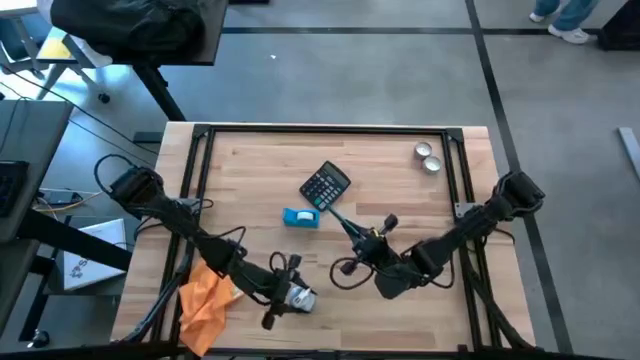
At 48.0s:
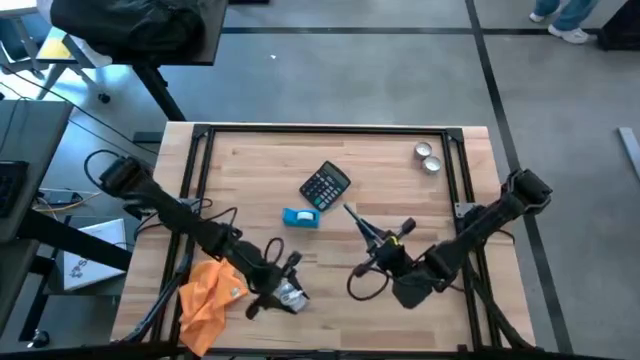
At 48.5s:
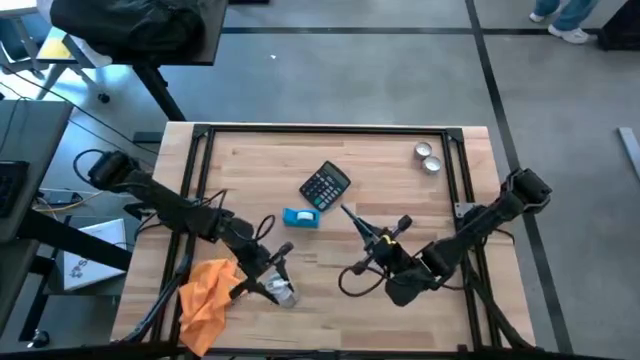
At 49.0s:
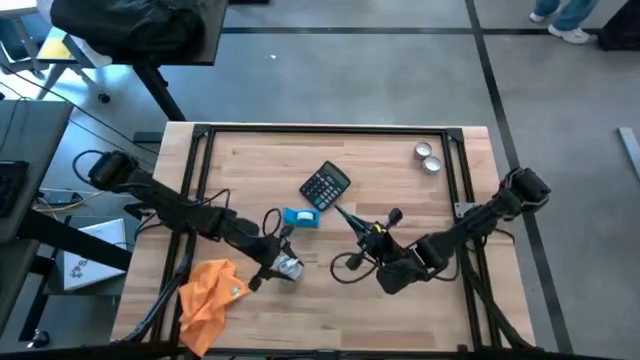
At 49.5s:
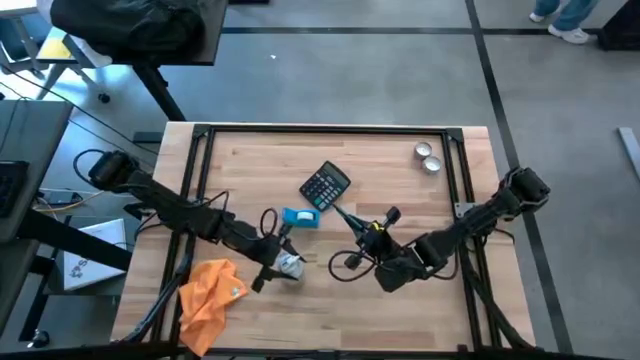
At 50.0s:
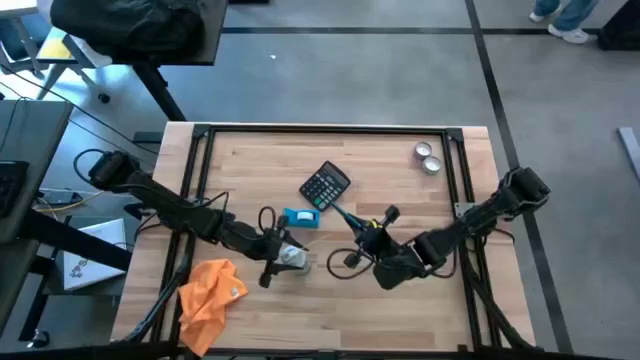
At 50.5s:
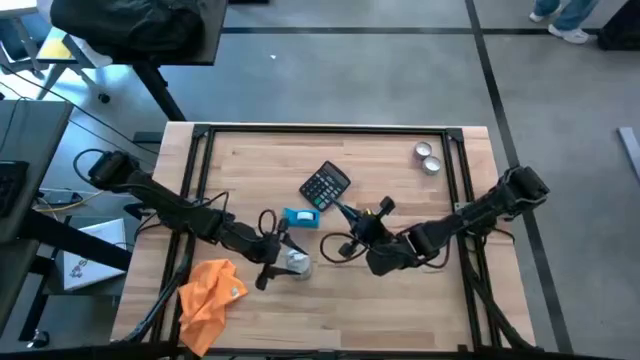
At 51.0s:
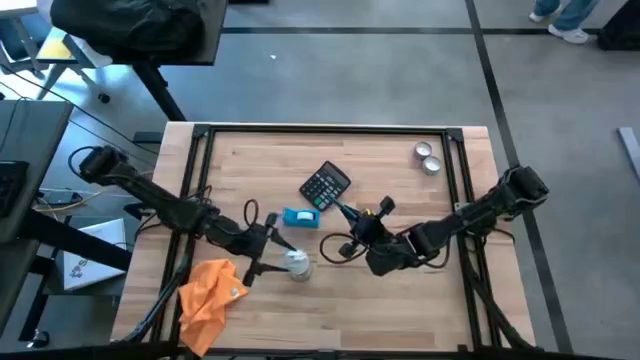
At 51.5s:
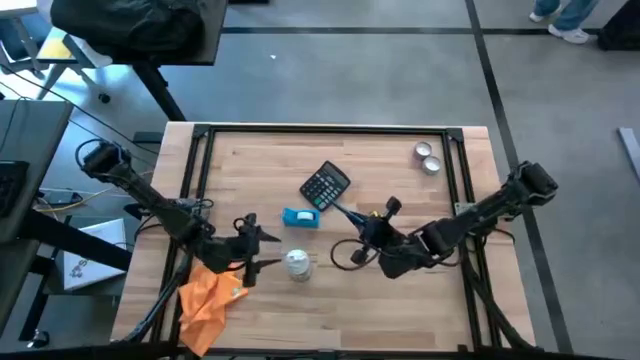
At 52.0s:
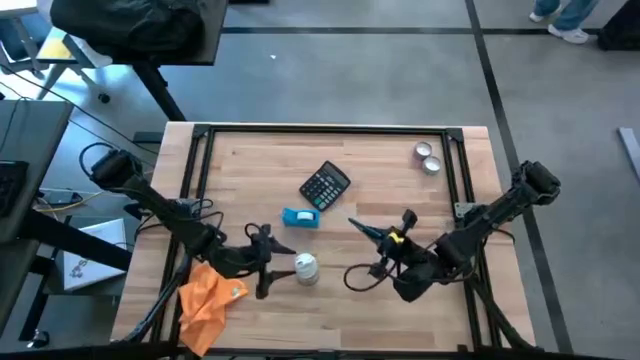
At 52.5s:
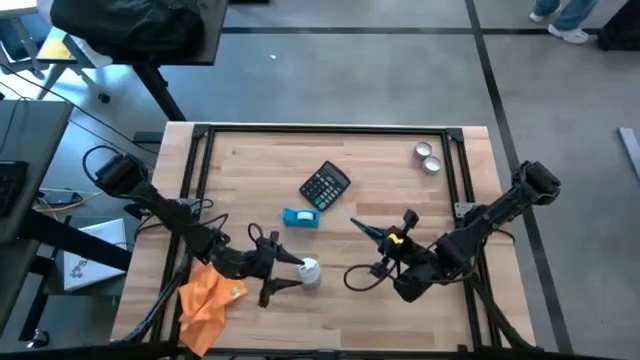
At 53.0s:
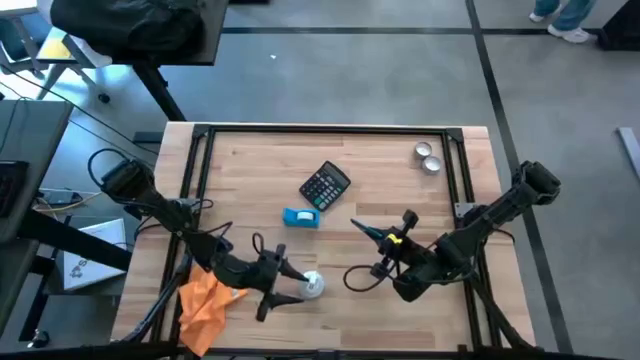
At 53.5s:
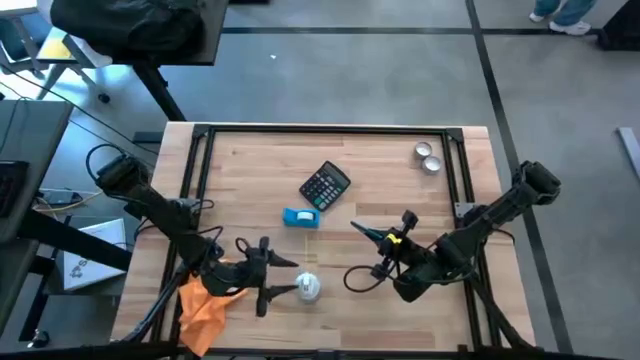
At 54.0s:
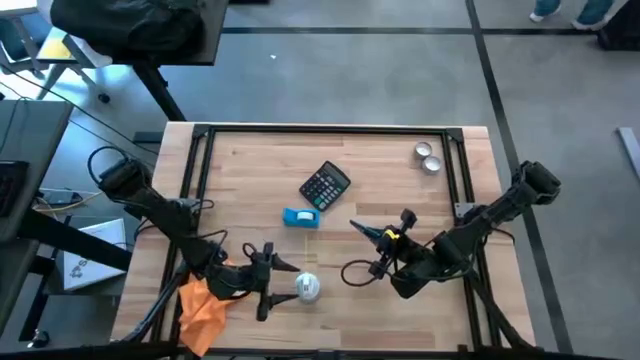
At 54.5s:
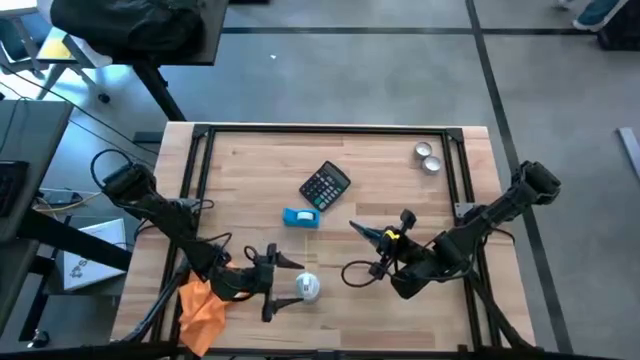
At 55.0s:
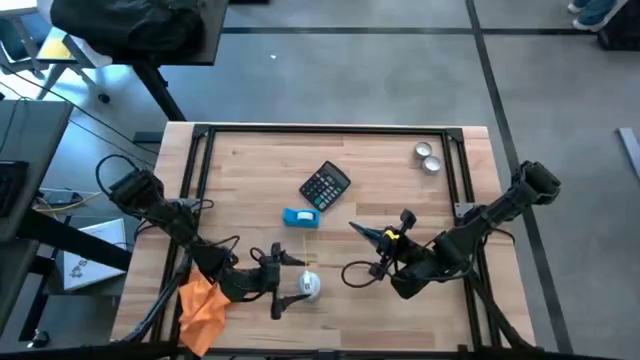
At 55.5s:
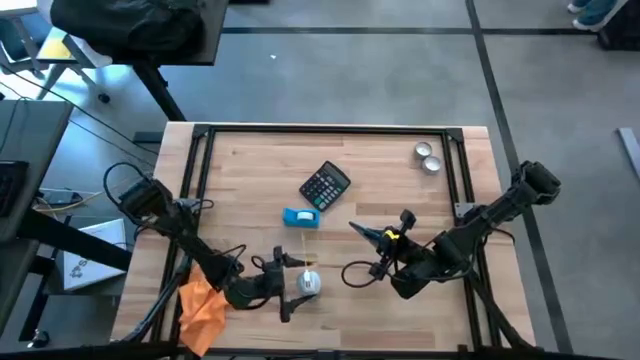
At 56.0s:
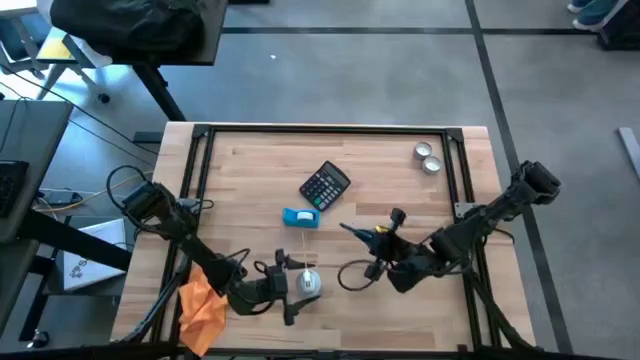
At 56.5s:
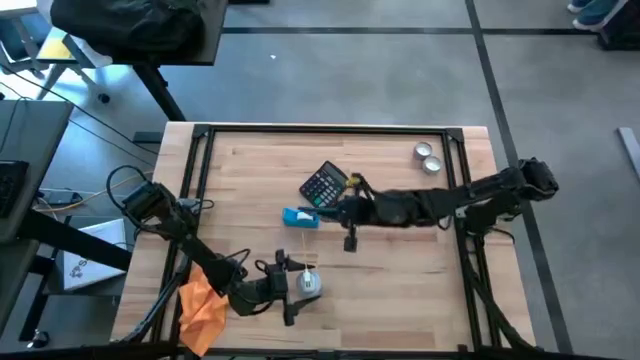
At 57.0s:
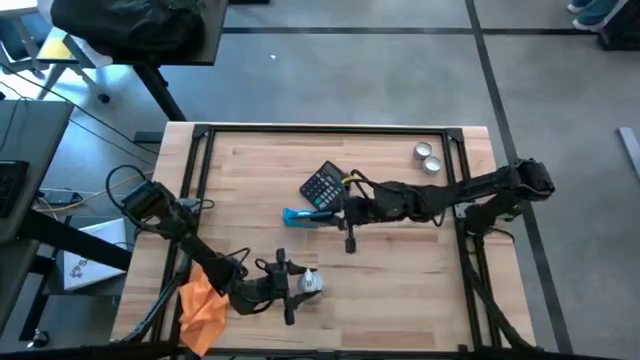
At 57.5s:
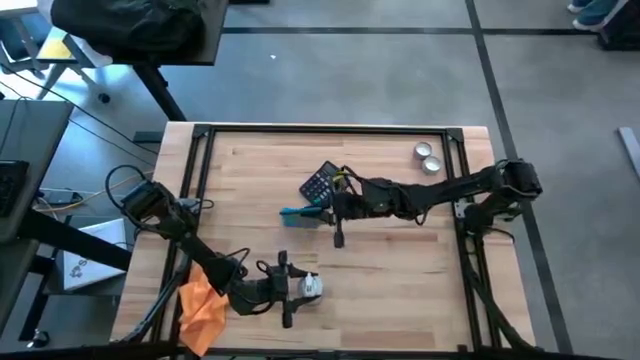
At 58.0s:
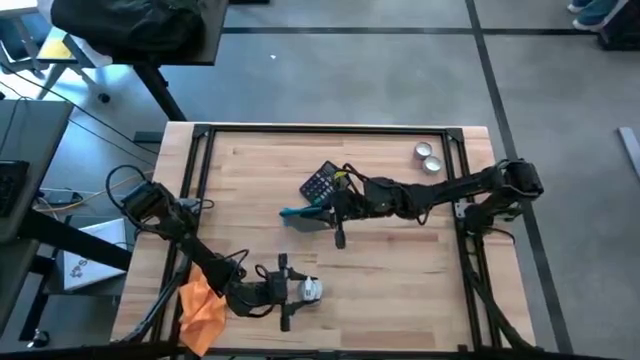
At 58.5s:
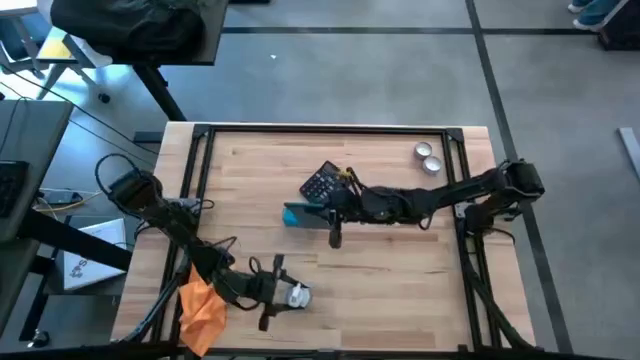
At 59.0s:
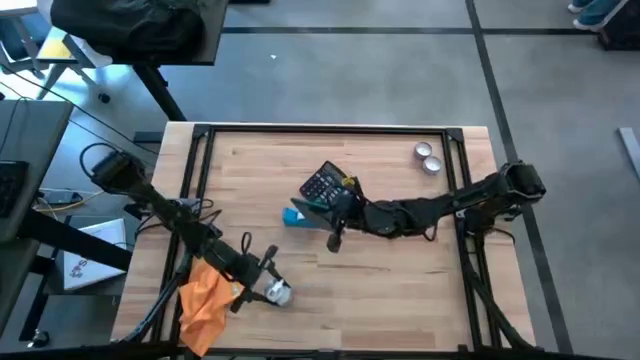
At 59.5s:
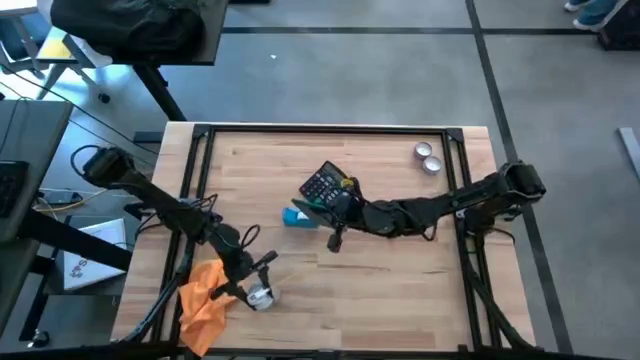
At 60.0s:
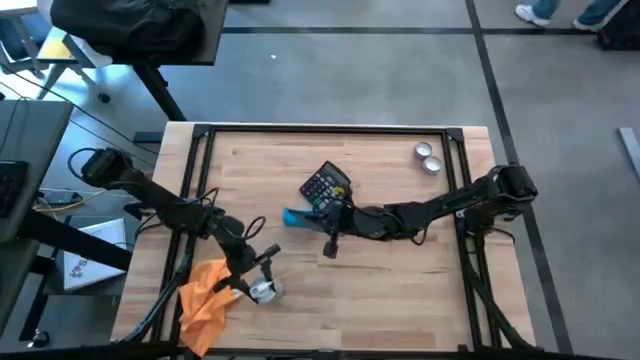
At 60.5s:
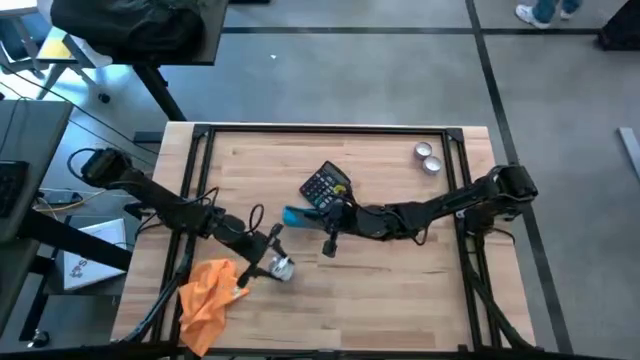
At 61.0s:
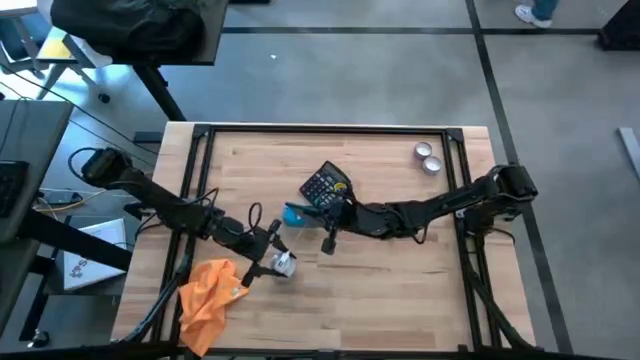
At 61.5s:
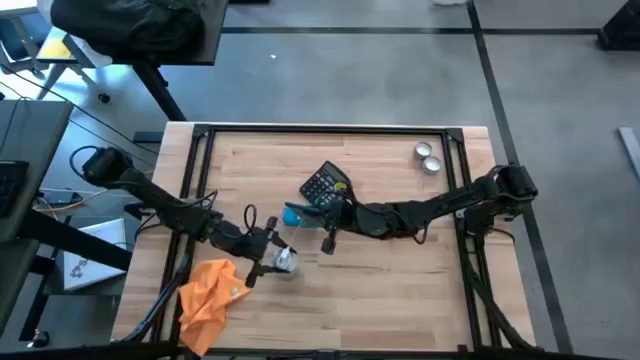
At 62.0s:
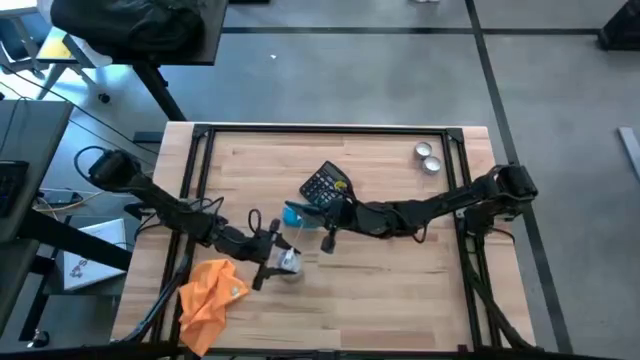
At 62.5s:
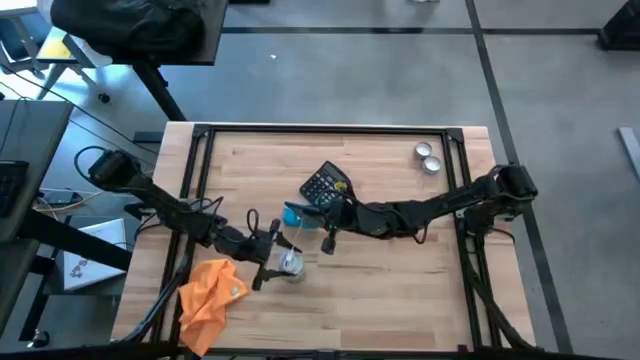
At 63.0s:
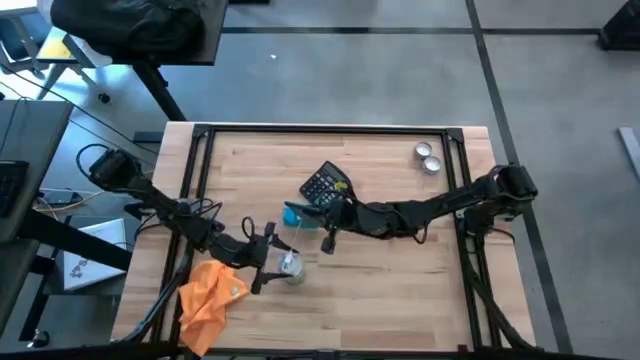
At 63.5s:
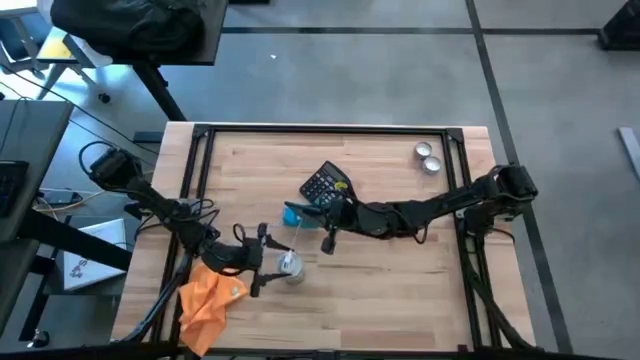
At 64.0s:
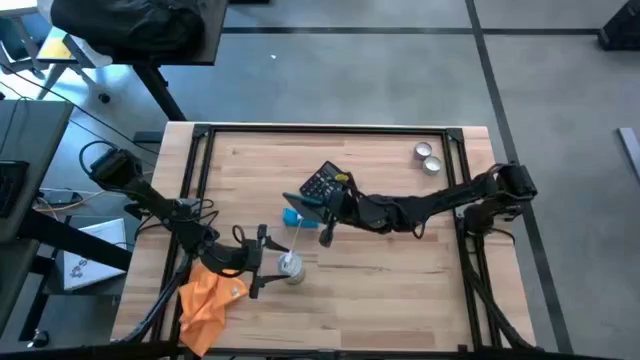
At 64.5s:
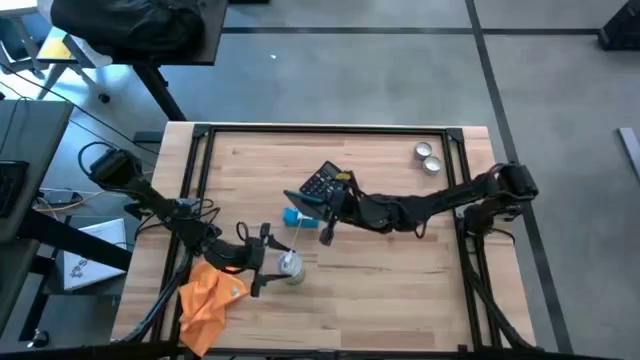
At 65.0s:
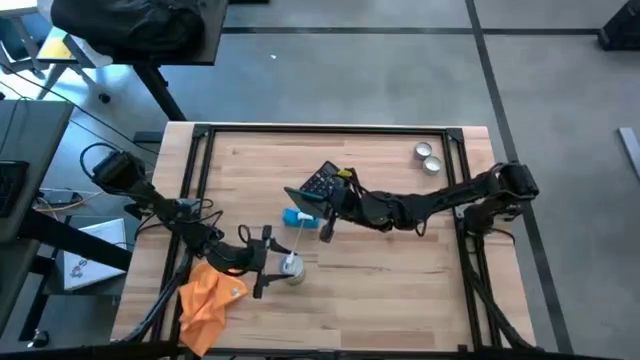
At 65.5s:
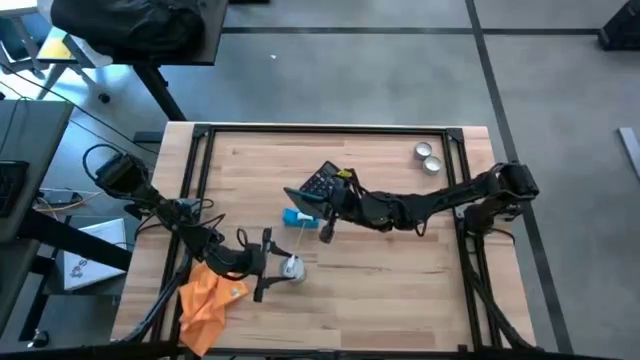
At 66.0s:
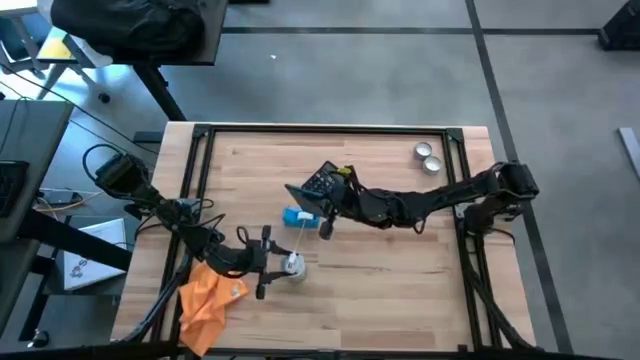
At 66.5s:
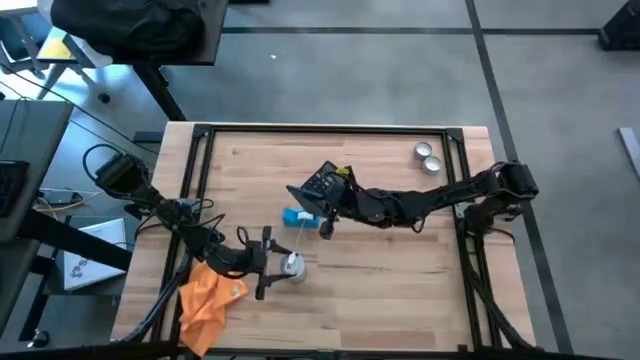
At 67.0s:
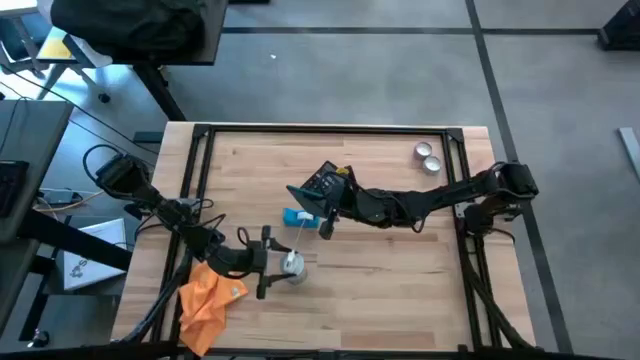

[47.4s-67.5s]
Task: Apply microfiber cloth
Spray the cellphone using the white spray bottle
